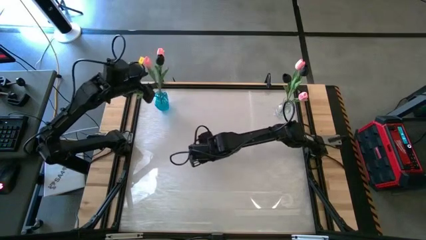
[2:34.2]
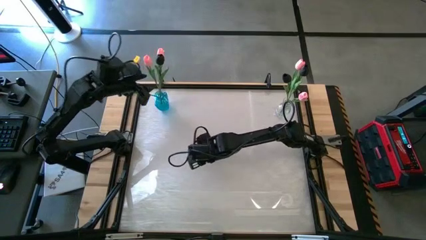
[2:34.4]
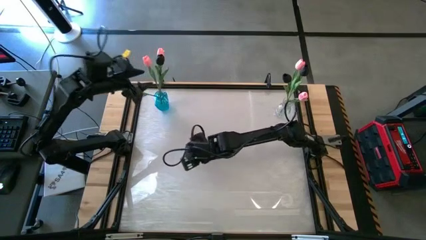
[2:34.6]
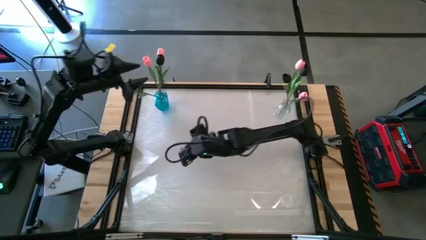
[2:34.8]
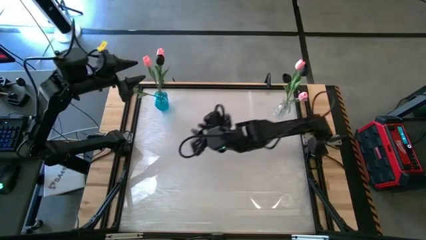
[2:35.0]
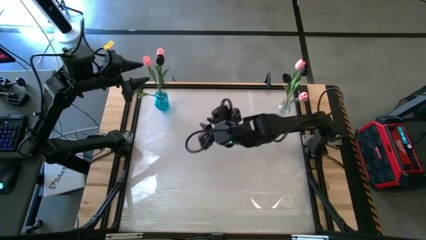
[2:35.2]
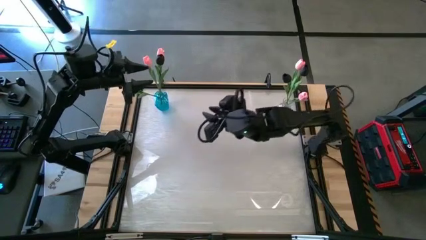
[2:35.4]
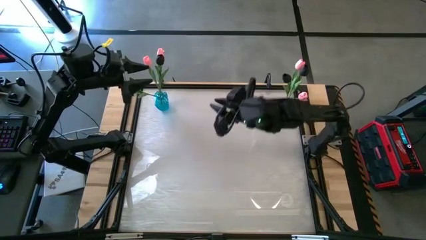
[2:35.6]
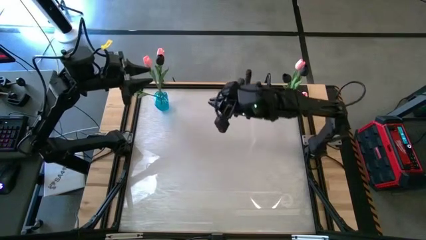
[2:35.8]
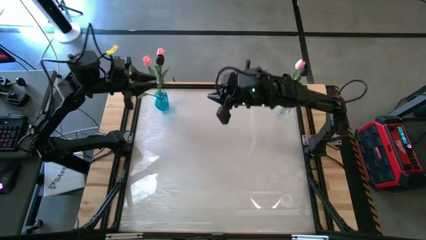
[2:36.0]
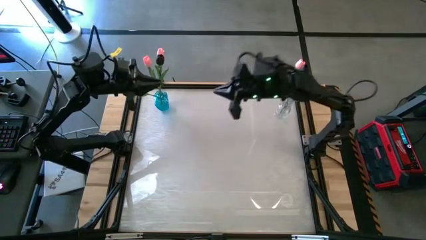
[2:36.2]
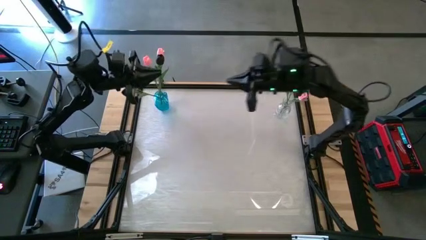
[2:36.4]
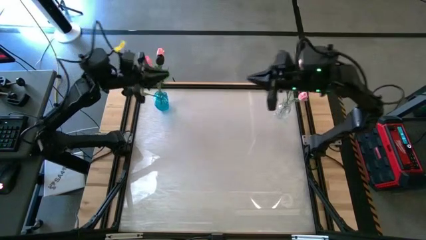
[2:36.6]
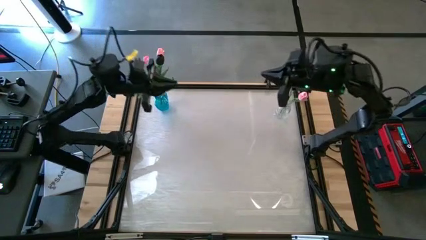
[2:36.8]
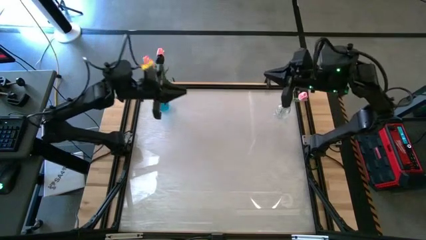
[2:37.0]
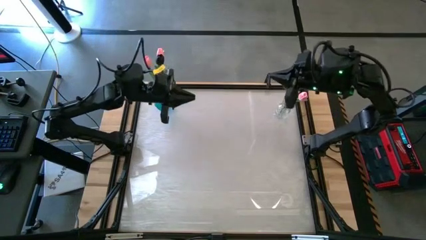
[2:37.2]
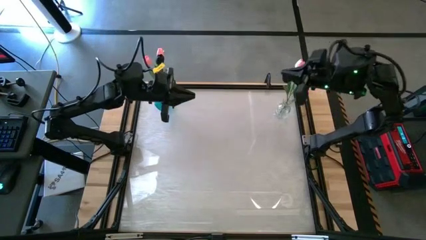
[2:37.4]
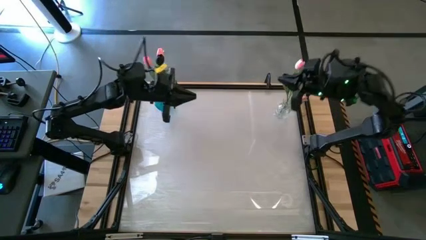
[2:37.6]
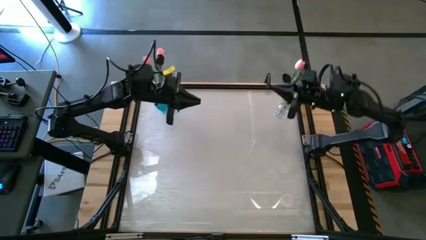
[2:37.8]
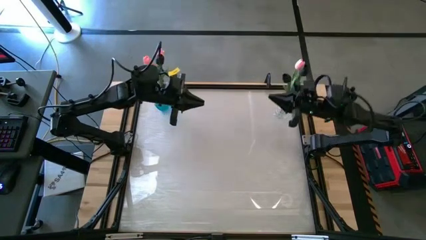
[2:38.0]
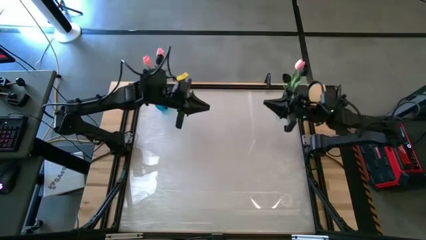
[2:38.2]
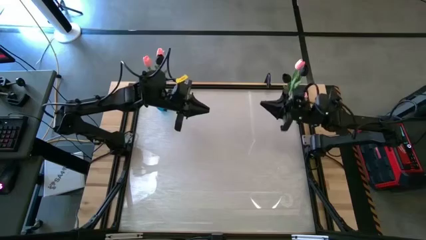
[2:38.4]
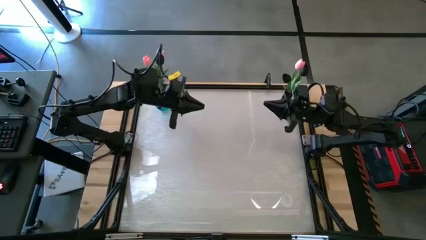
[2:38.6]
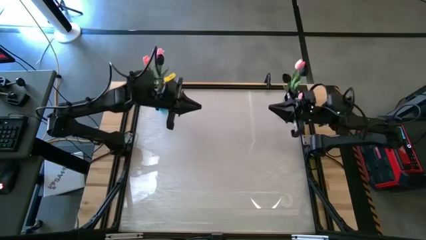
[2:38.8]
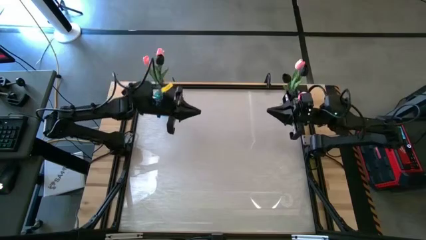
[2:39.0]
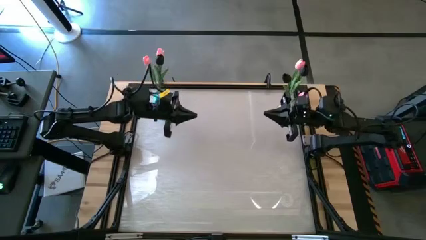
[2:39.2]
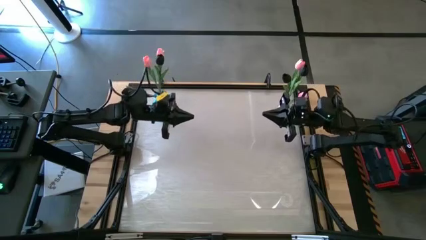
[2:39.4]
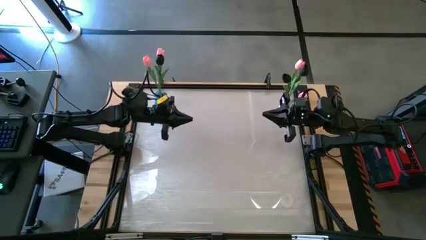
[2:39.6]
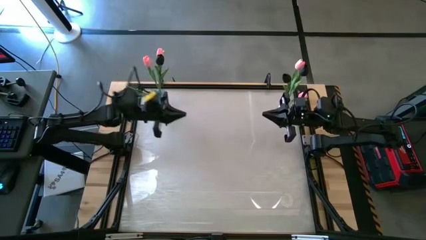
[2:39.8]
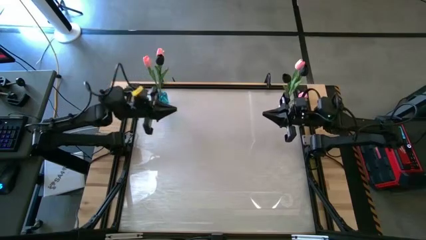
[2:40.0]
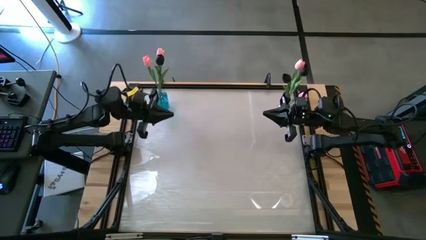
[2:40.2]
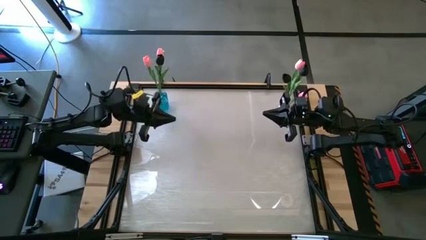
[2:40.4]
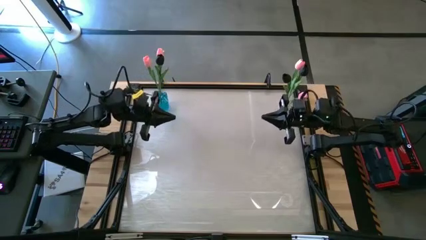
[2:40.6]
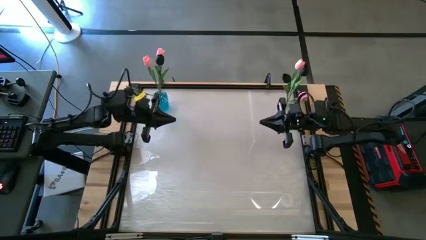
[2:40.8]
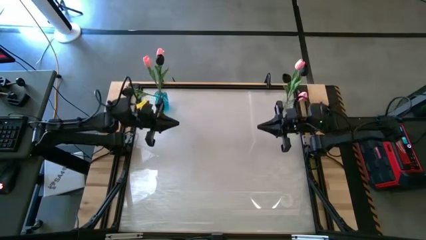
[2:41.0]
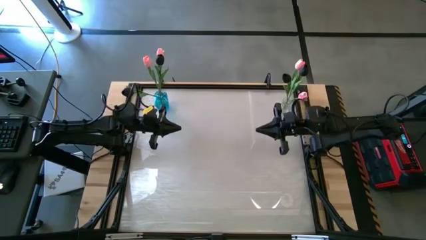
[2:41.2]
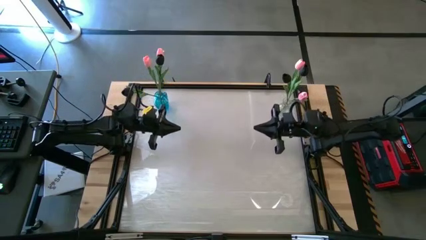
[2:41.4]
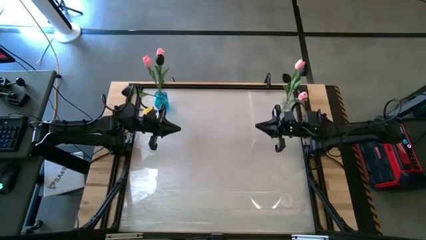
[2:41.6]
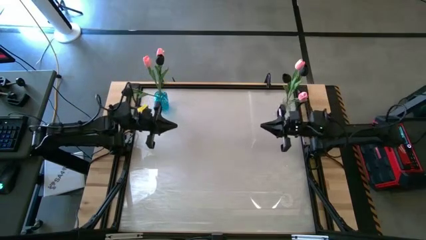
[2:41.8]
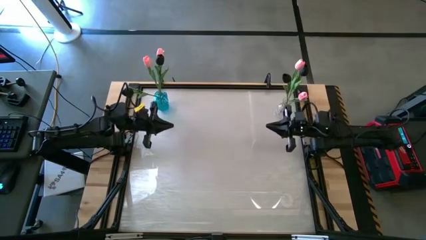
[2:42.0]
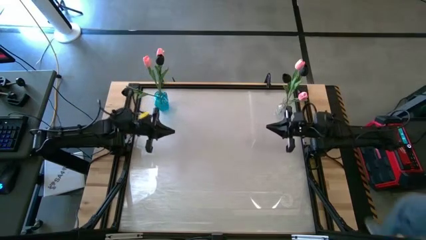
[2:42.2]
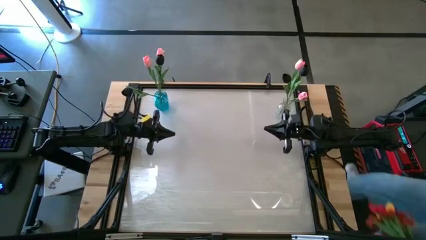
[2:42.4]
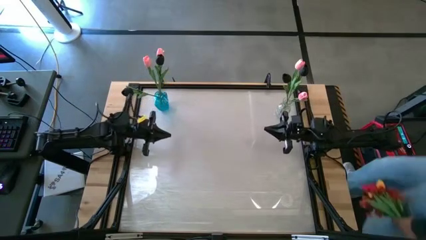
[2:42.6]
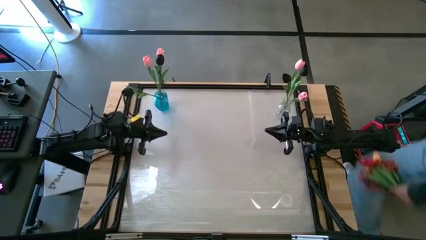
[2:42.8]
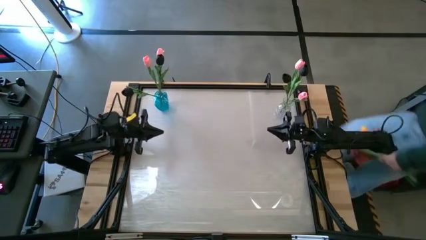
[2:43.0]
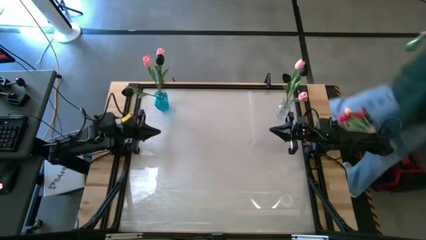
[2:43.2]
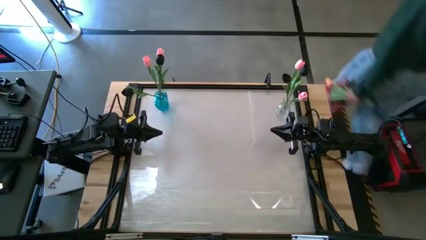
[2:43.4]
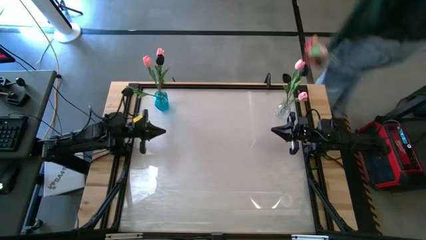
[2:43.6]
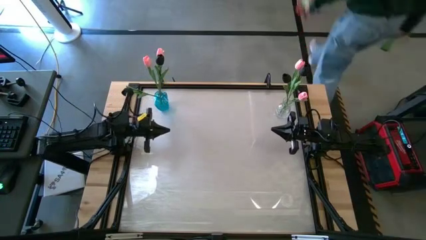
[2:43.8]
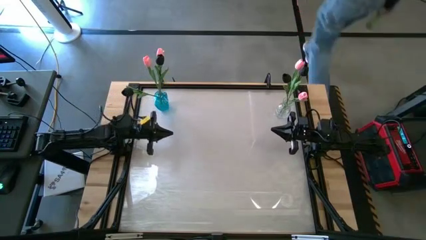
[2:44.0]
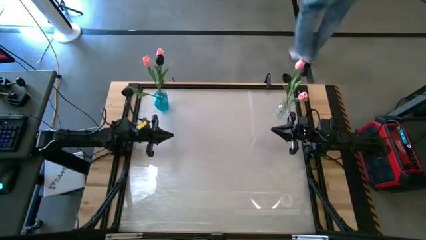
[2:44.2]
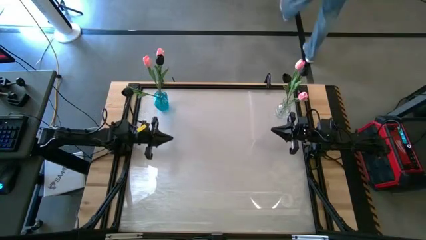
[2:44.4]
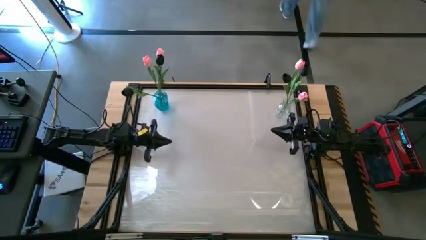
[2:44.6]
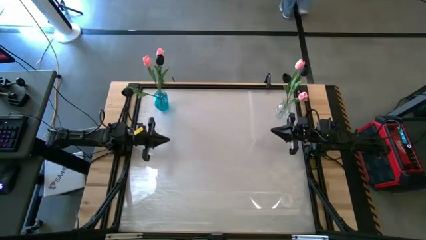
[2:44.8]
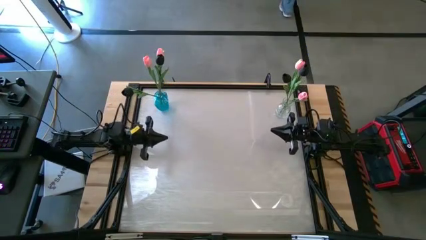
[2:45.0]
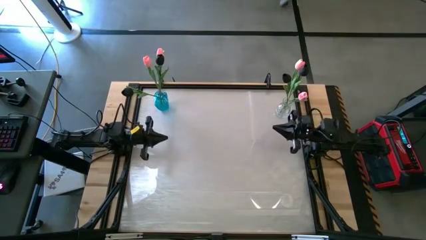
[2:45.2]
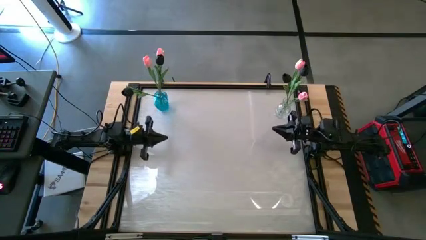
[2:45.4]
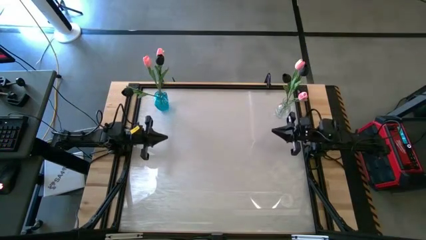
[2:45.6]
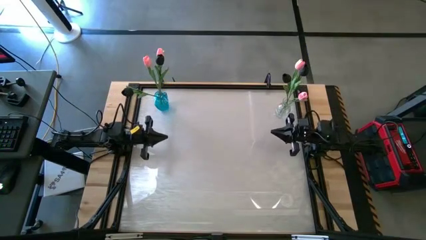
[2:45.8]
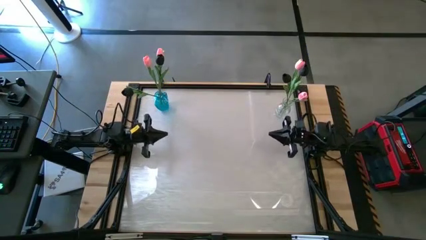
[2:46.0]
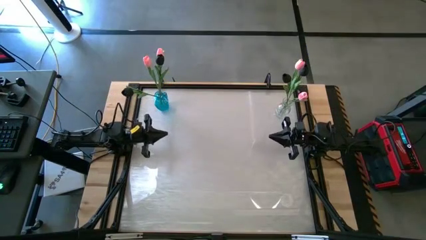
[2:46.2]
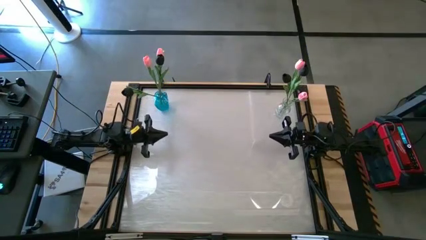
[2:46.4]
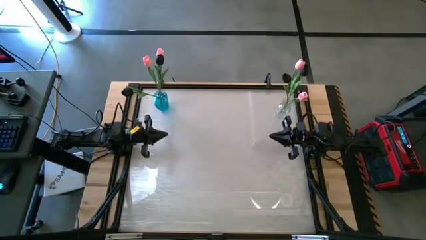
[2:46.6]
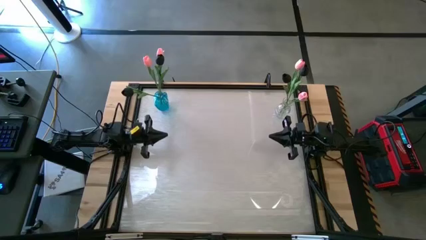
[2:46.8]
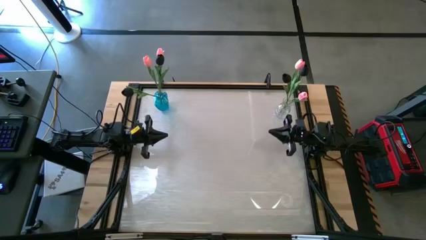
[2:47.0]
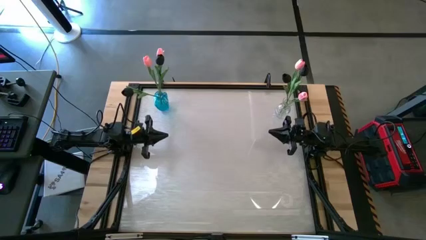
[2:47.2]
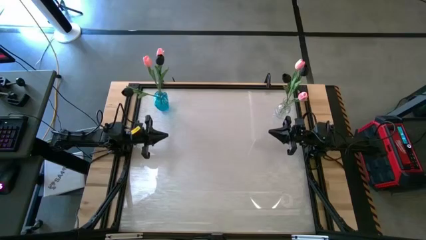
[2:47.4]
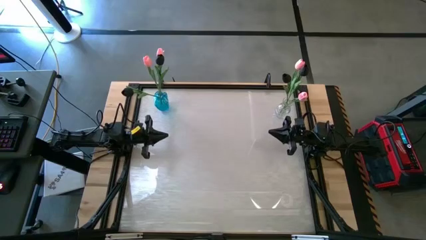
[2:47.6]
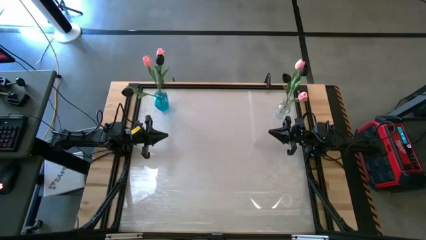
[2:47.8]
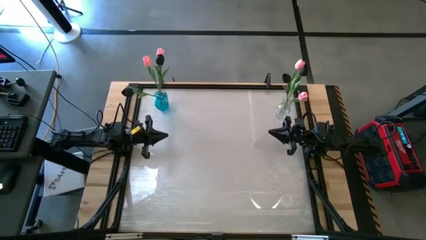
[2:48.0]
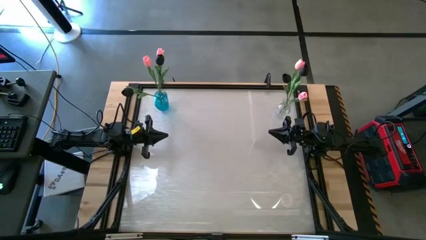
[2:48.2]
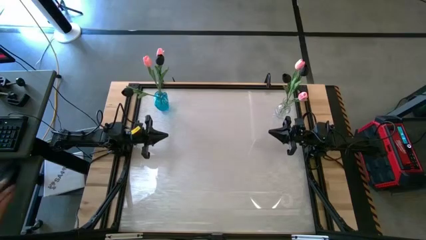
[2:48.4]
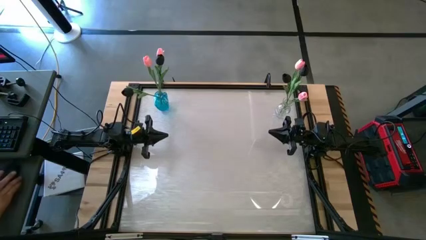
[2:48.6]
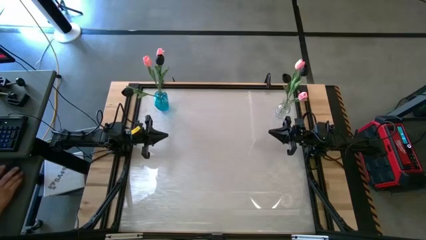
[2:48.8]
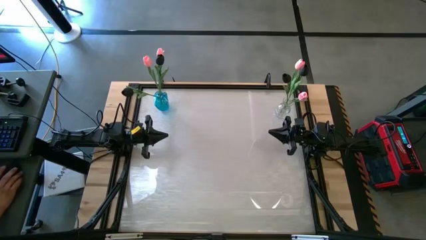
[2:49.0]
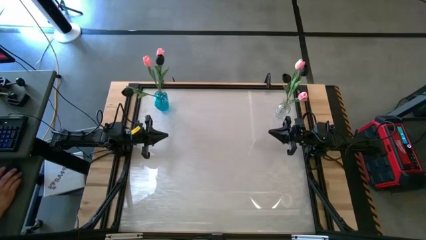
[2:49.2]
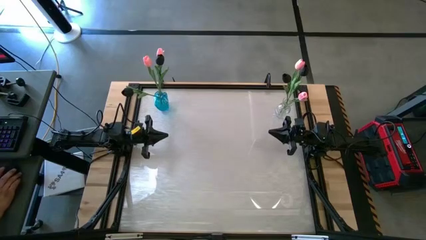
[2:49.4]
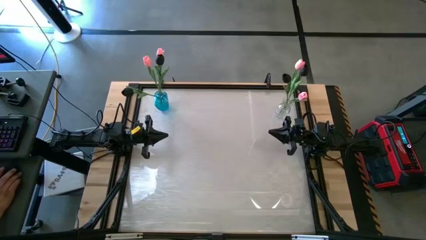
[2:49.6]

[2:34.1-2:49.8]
Task: Sort flowers into vase by color
Return to Home Position
